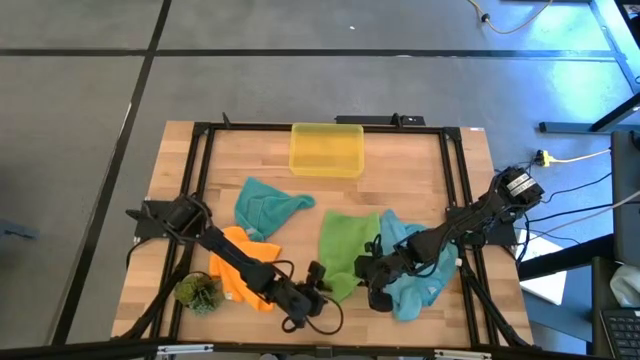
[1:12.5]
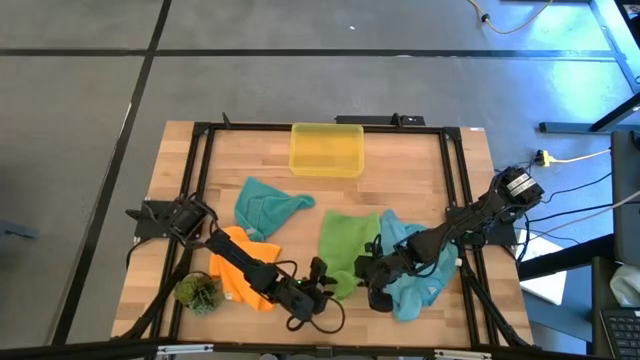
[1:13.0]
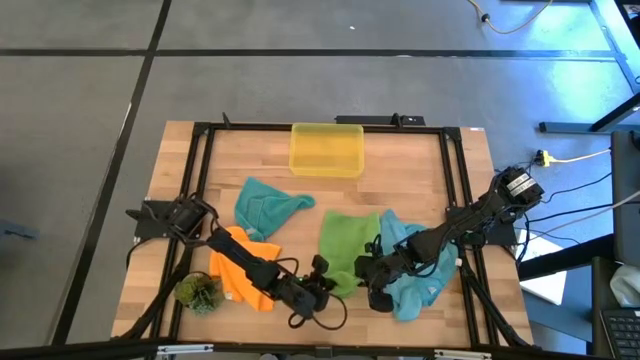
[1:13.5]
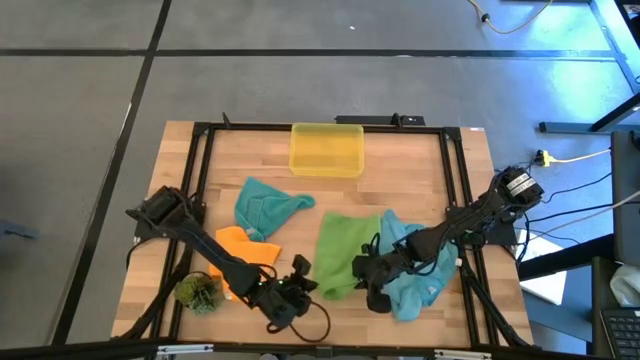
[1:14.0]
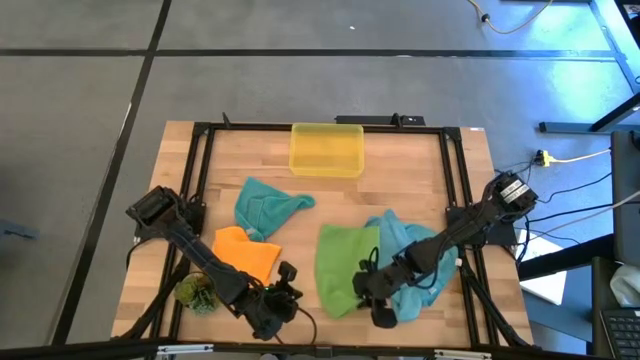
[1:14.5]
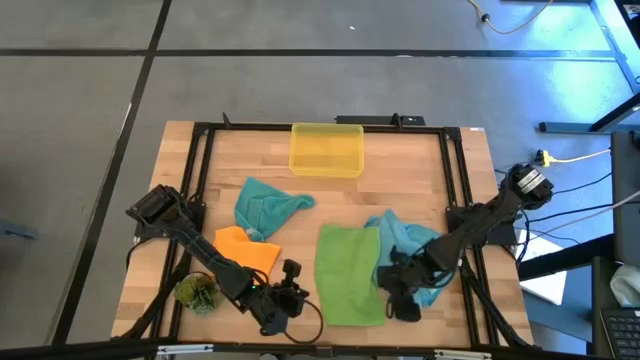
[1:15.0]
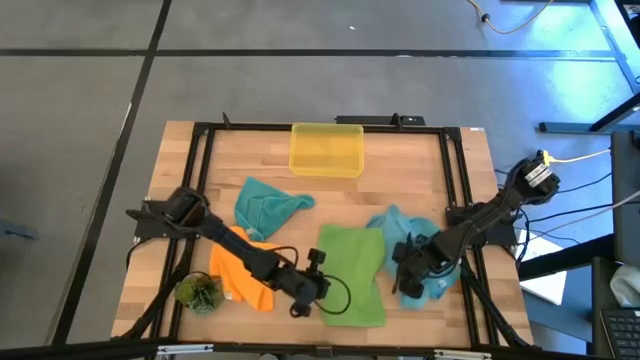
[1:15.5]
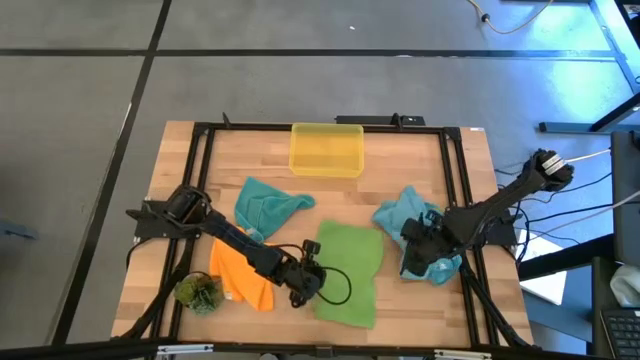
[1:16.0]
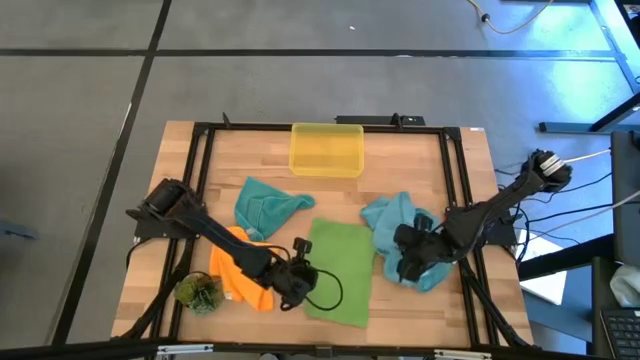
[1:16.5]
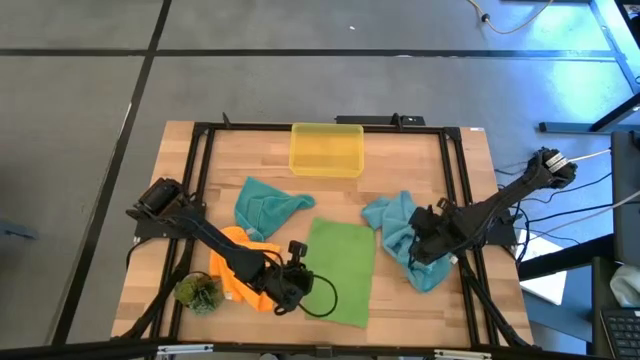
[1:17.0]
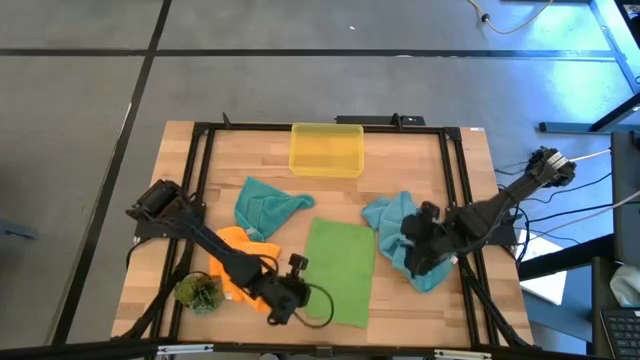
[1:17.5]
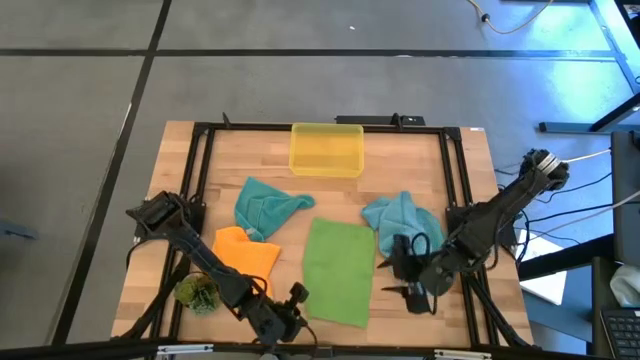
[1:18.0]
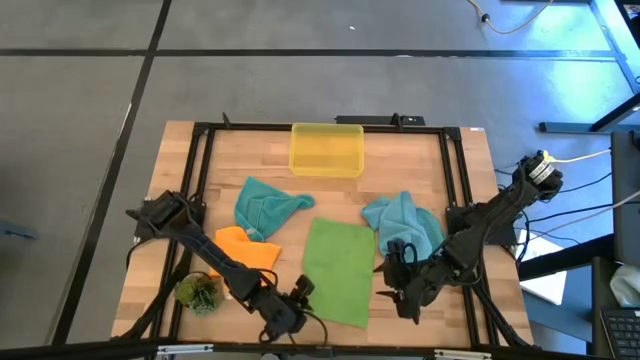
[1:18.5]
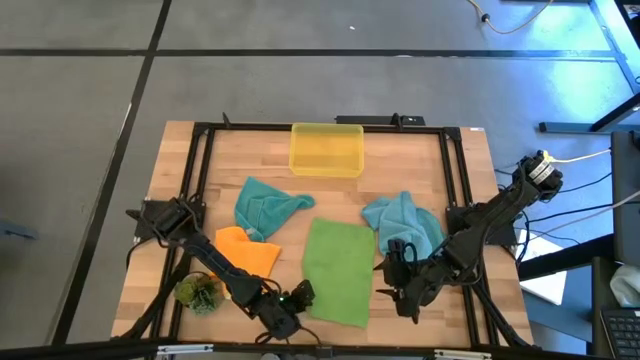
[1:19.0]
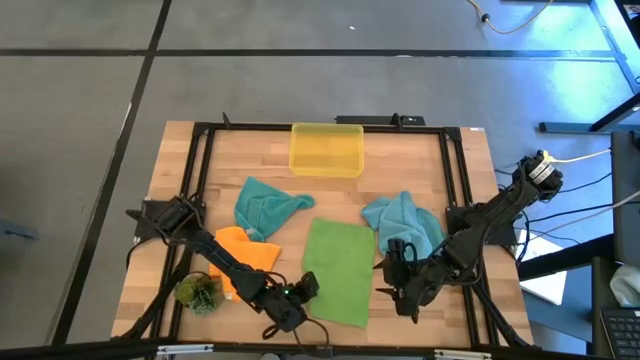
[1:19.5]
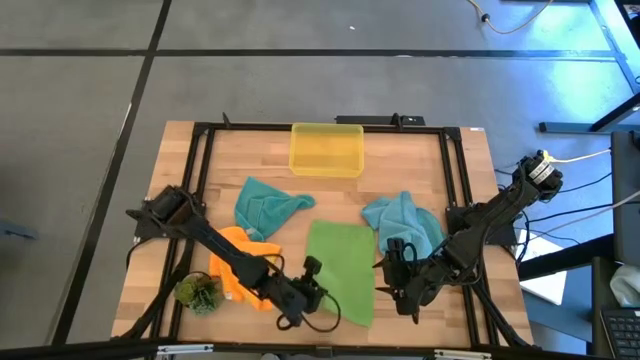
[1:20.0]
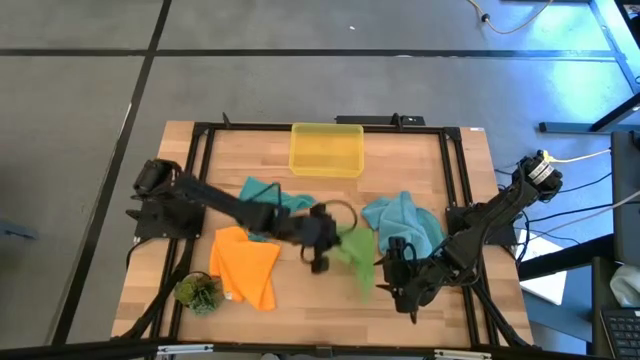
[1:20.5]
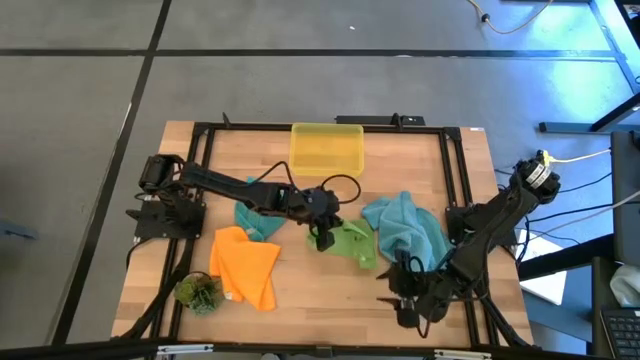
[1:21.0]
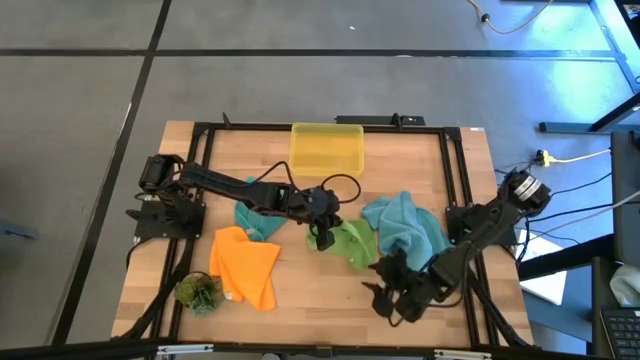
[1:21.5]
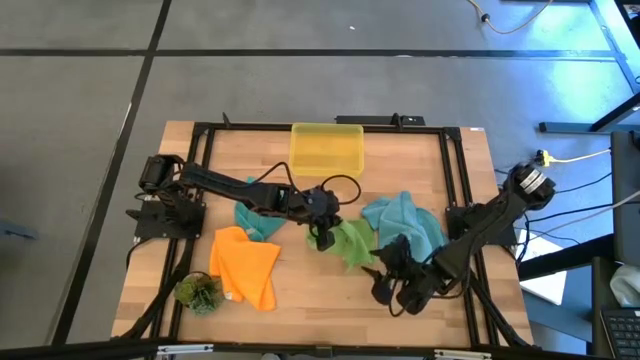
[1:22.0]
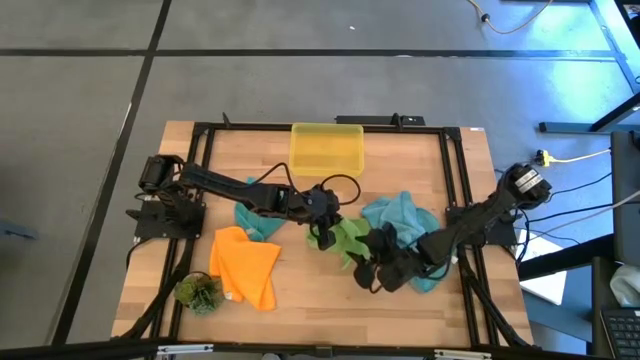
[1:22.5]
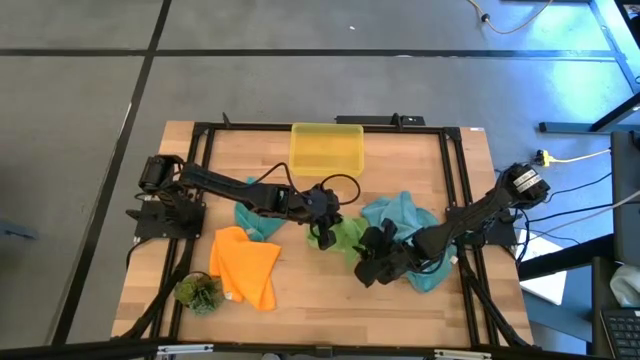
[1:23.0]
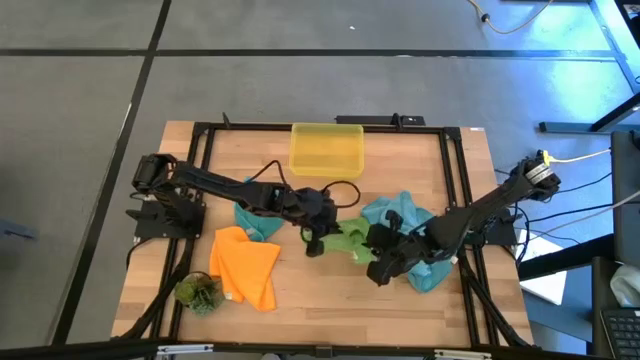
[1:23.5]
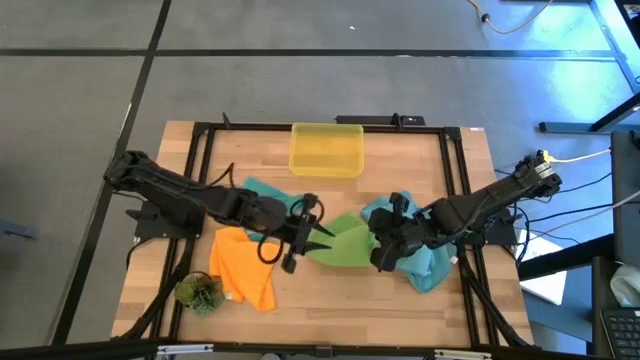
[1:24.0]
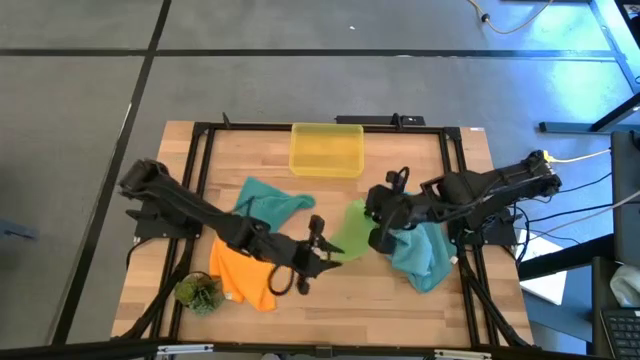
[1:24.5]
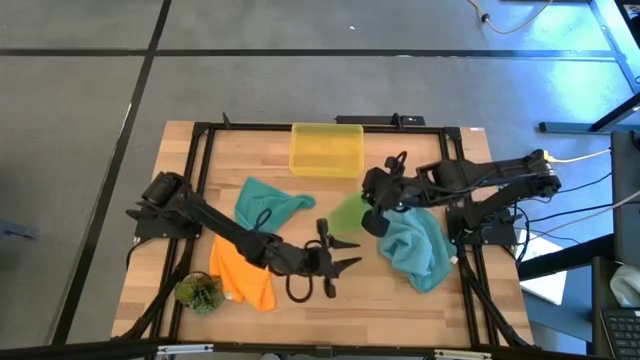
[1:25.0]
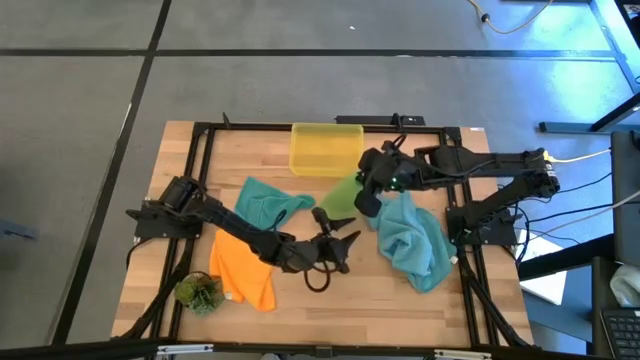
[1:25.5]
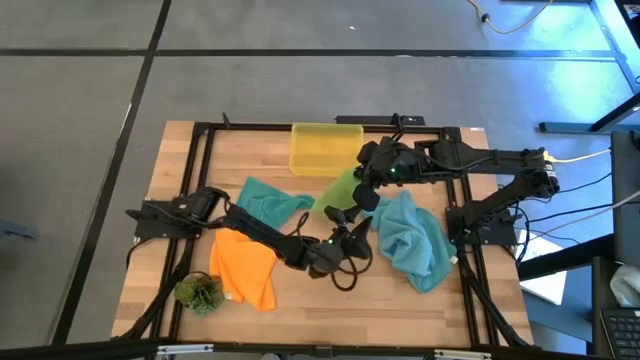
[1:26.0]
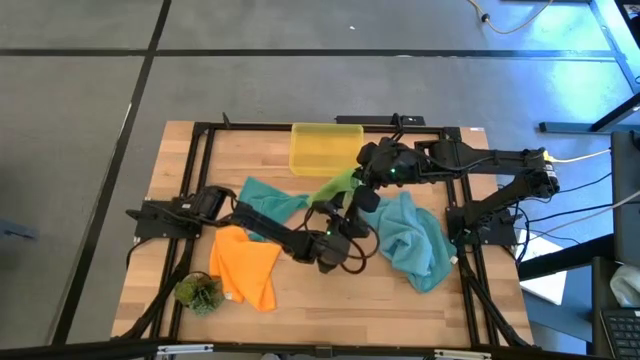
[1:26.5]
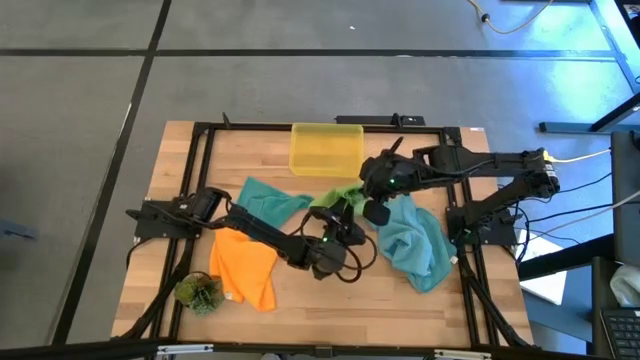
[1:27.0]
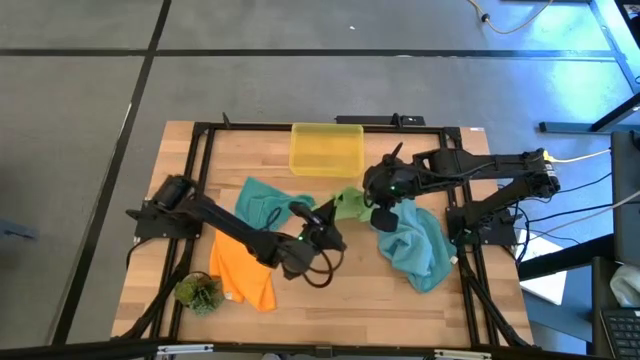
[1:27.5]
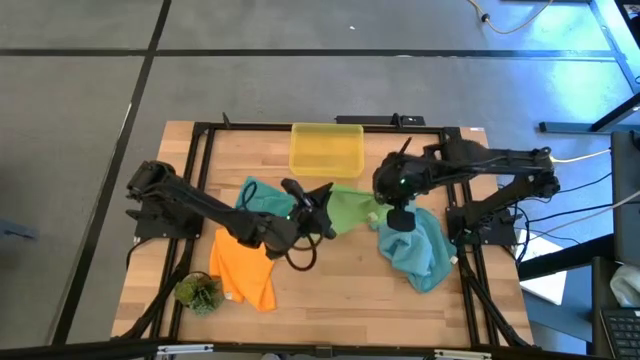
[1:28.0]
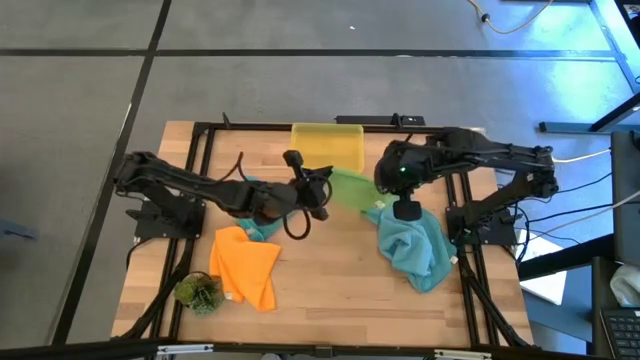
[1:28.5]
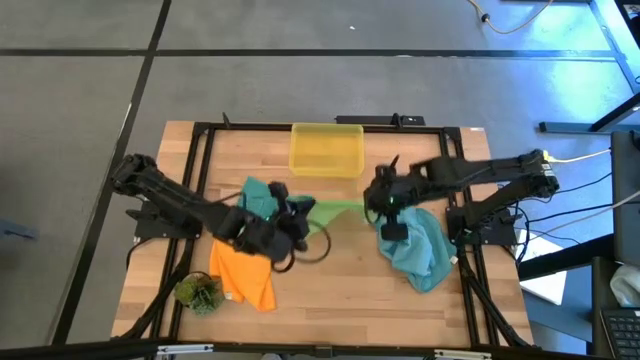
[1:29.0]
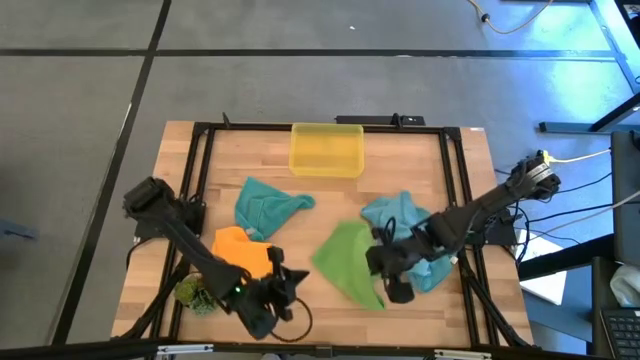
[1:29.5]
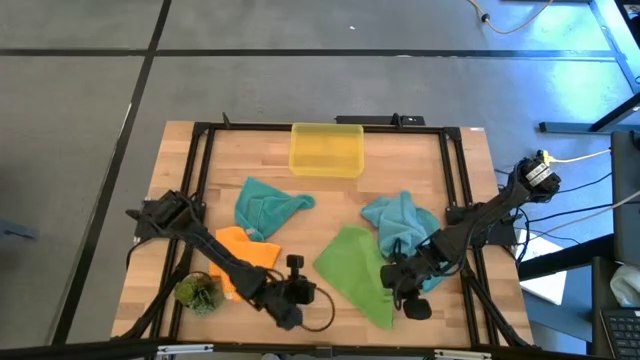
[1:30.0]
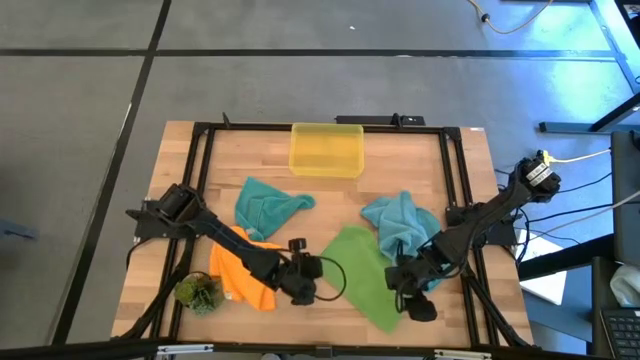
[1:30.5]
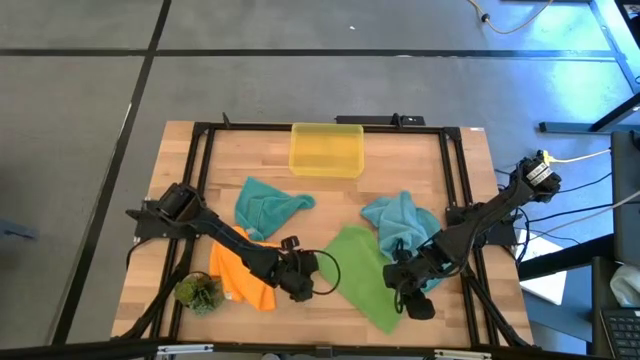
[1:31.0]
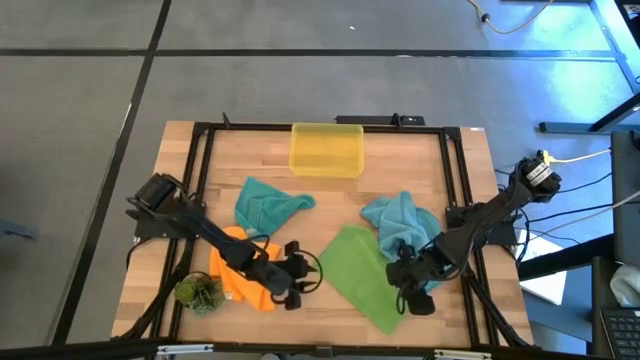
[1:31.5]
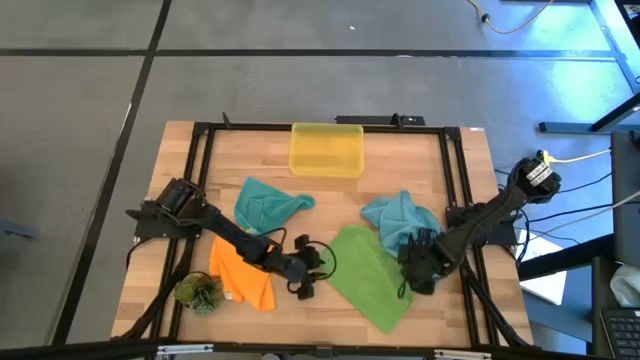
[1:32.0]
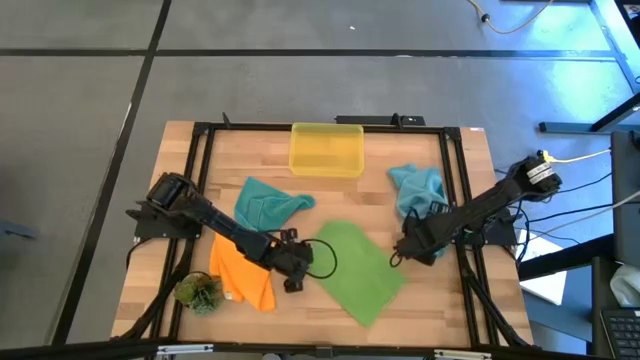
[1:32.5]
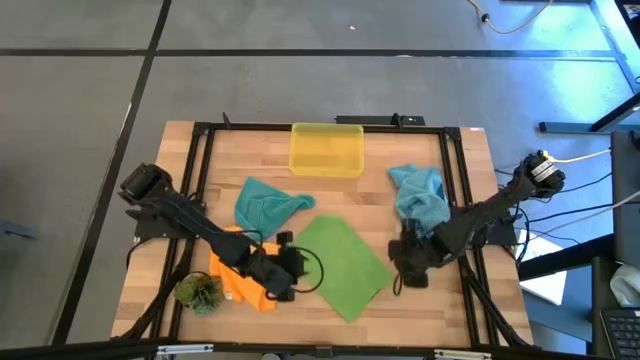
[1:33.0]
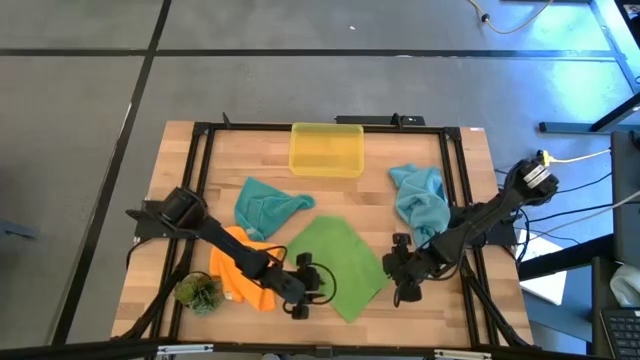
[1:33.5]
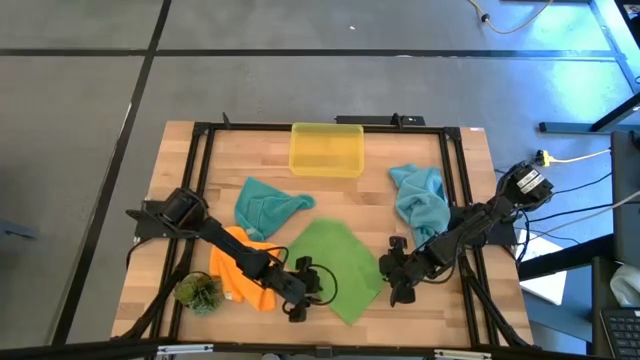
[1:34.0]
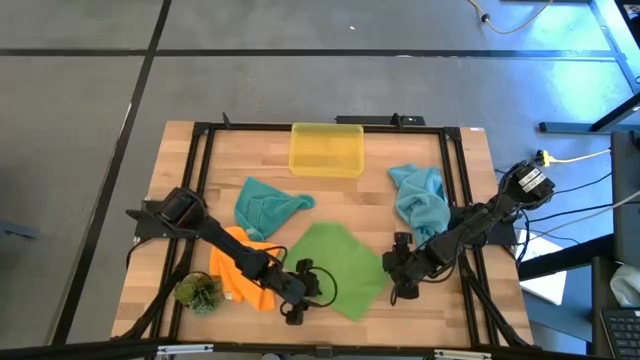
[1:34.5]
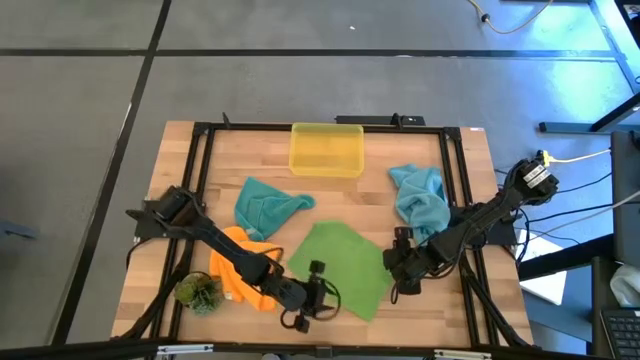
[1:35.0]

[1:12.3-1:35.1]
Task: Fold microfiber towels
Fold the green microfiber cloth
